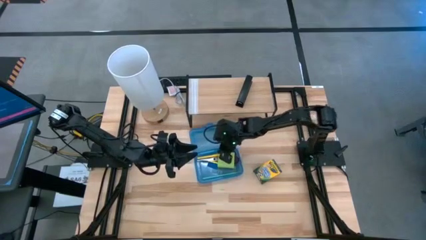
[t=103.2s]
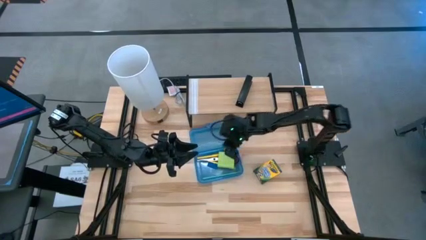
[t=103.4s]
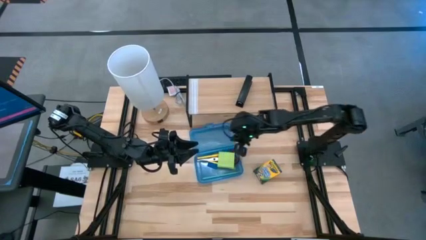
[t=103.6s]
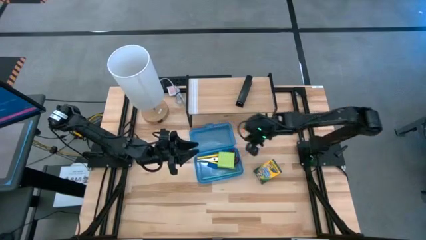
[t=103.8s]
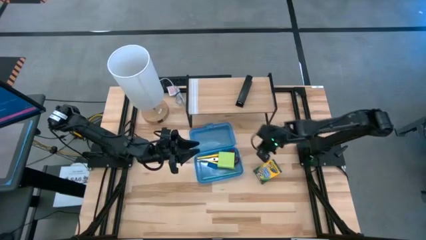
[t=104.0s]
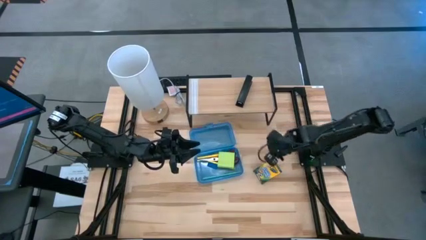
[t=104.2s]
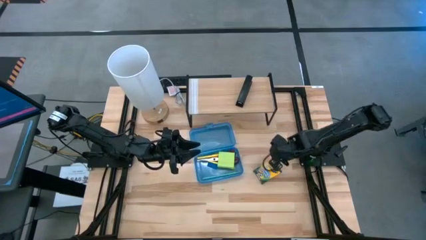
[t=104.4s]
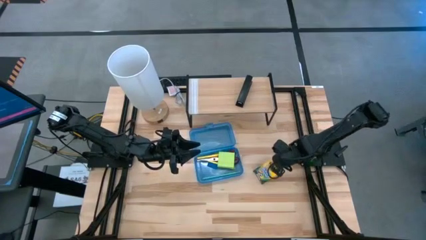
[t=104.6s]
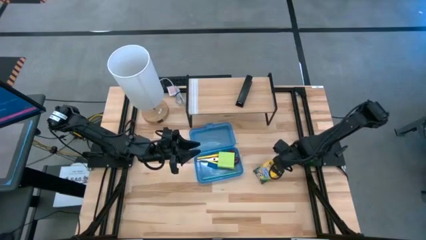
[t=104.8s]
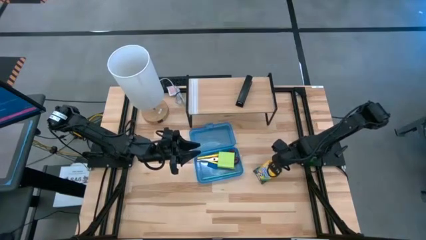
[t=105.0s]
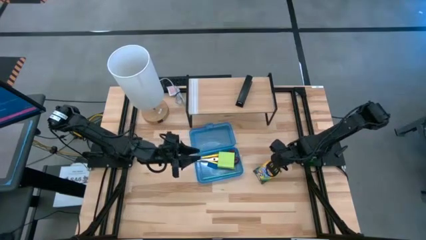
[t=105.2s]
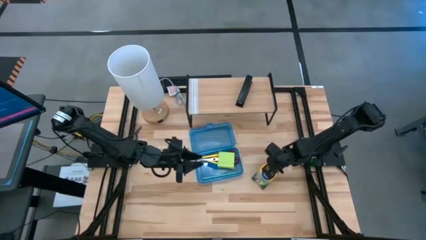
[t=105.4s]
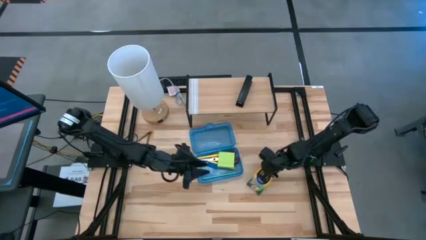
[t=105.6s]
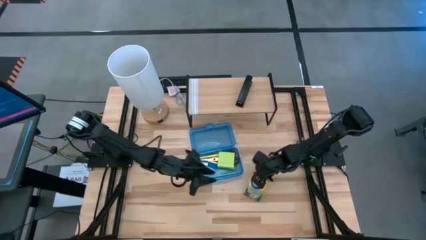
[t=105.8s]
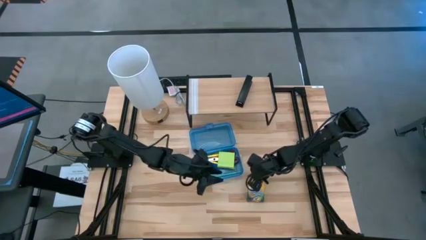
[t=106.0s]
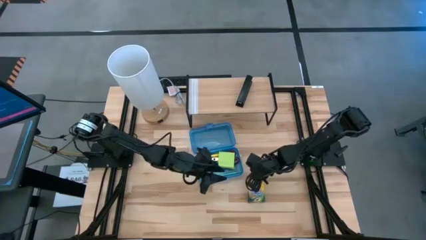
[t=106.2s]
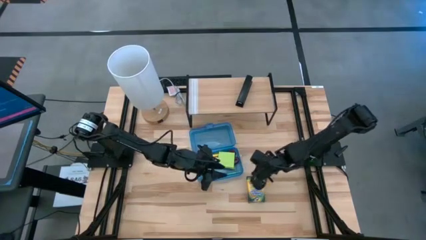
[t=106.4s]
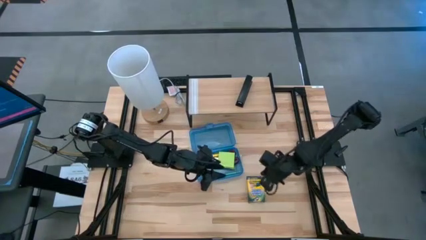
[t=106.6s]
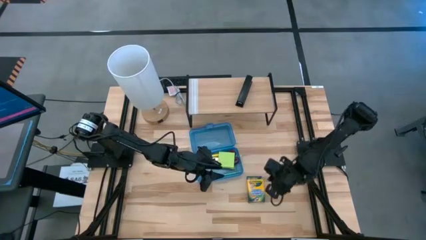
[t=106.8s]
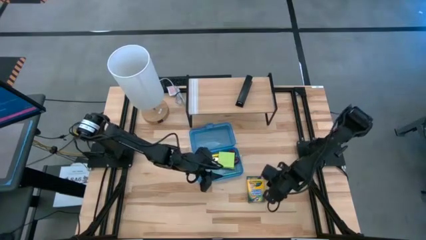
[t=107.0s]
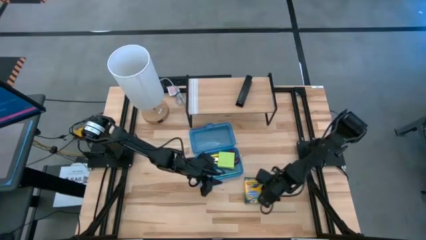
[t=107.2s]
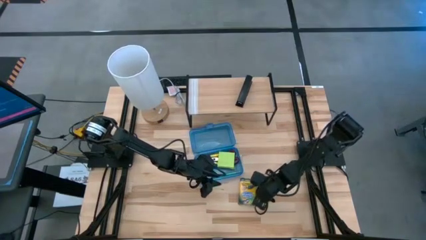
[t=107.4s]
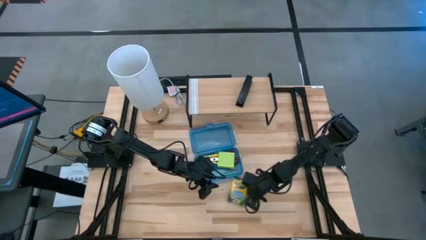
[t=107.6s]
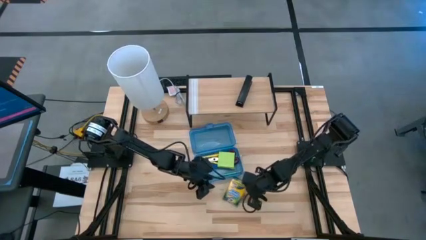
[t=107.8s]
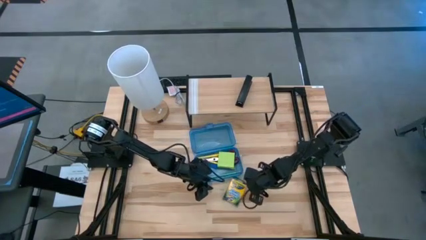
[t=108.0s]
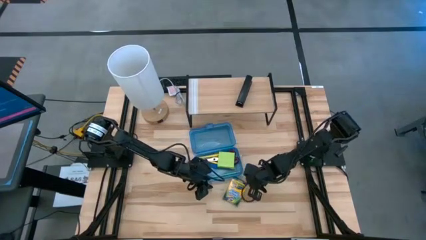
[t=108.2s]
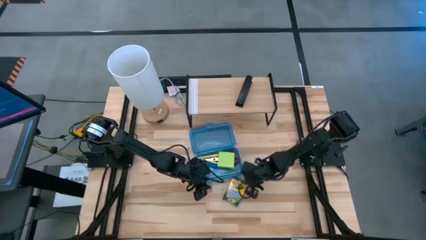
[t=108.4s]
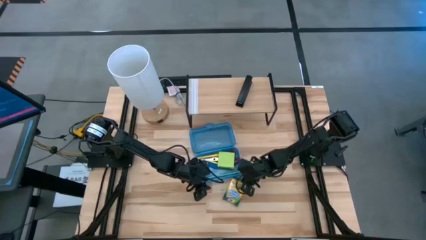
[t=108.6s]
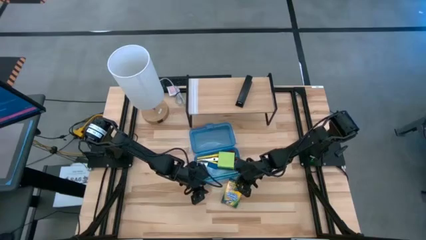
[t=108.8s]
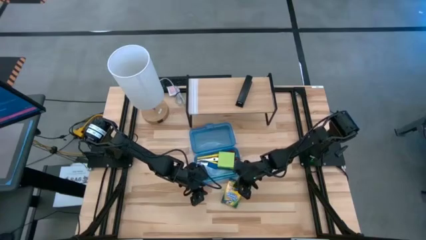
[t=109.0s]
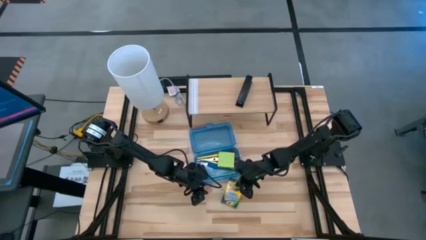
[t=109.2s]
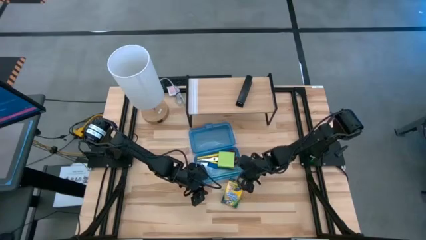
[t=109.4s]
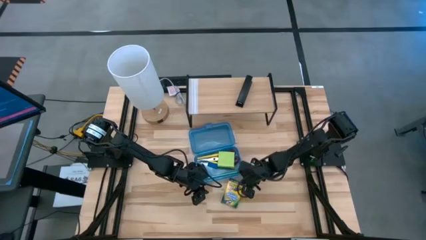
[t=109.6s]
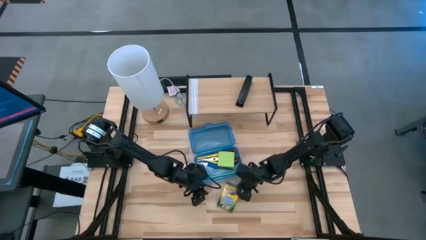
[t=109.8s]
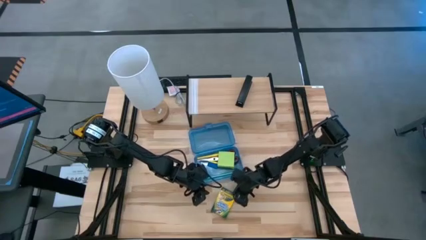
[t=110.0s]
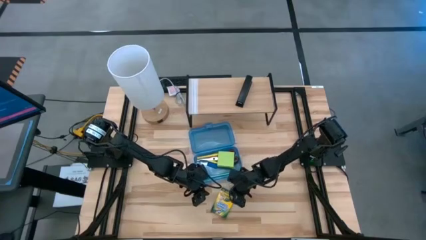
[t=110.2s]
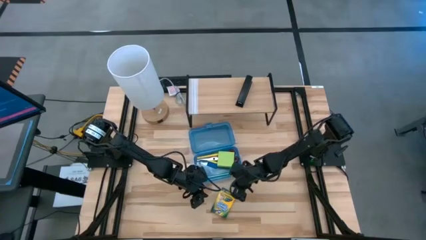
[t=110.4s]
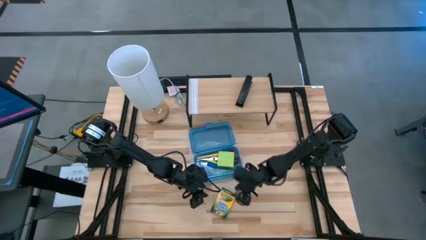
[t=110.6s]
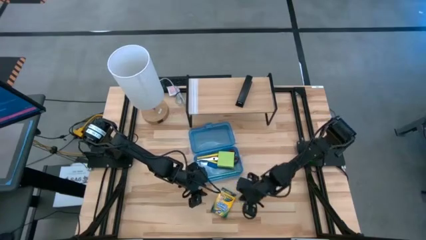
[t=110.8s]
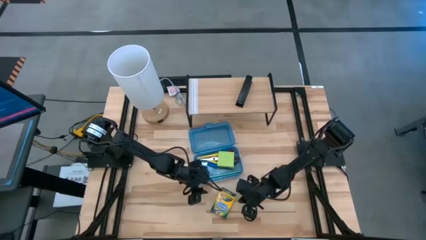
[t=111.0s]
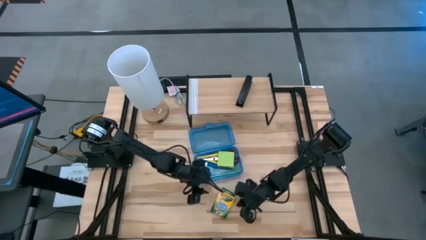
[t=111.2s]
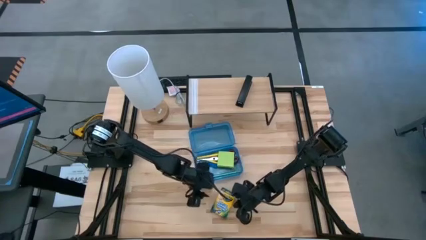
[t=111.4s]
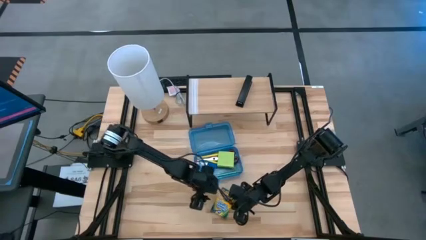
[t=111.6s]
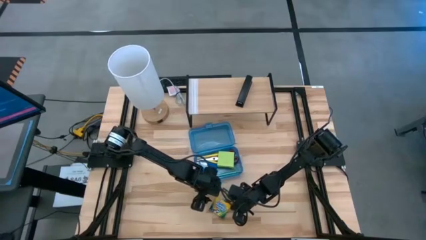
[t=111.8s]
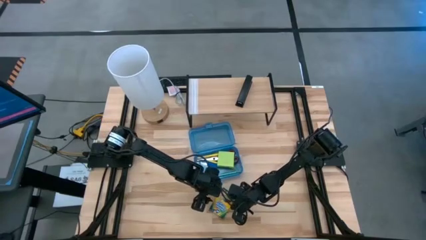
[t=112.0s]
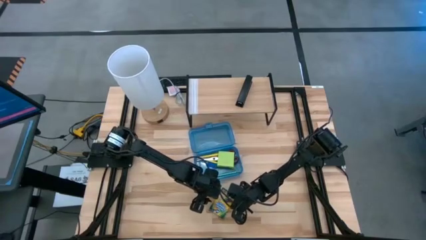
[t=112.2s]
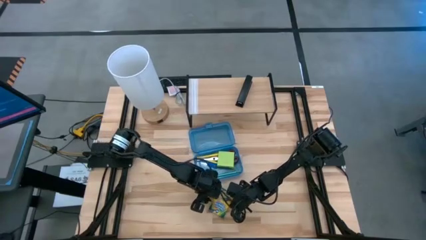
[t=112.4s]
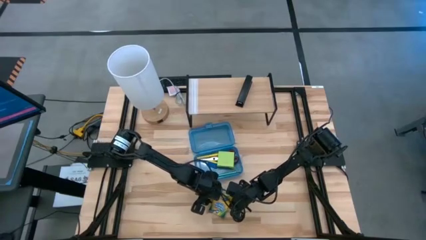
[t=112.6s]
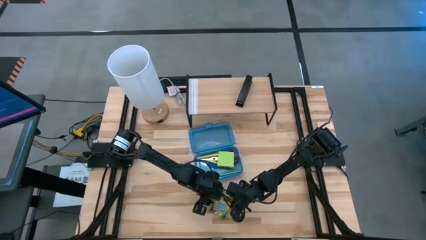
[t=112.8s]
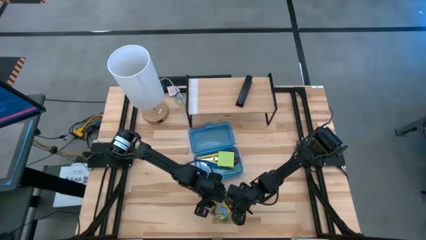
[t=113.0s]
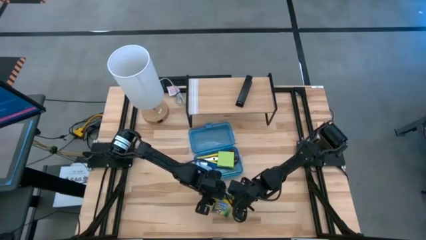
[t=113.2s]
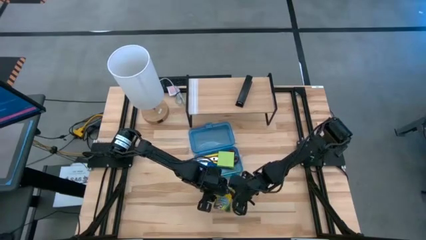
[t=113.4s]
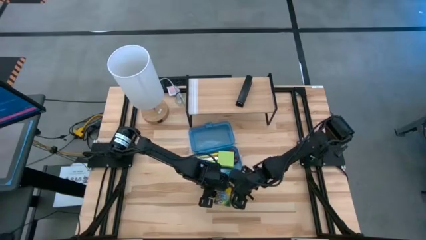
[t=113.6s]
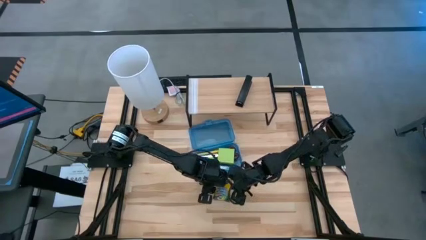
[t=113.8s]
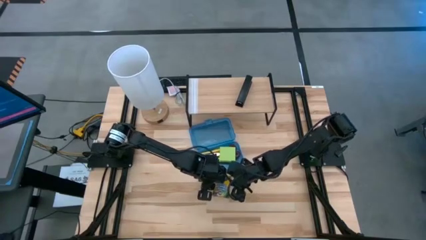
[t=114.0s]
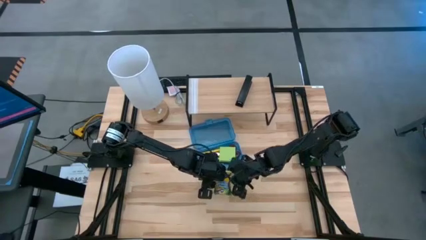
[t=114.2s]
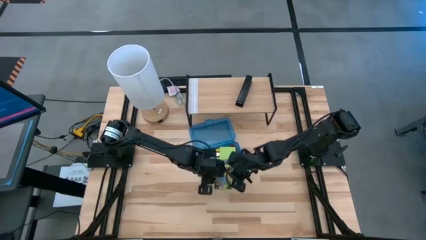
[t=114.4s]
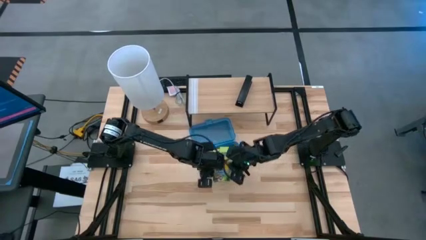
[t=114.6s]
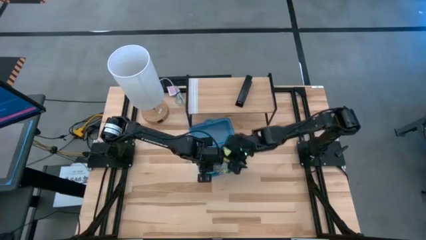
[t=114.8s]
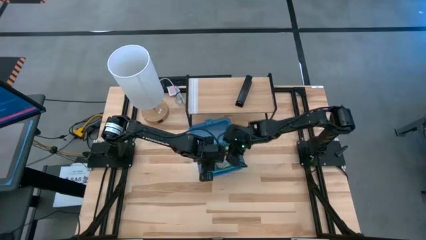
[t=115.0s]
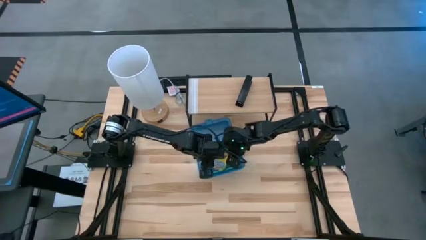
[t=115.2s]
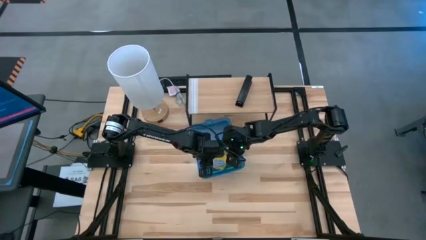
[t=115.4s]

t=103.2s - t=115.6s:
Task: Pack school essentials
Put the crayon box into the blue supply box

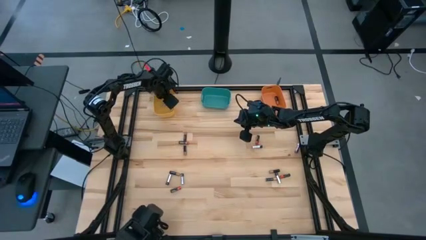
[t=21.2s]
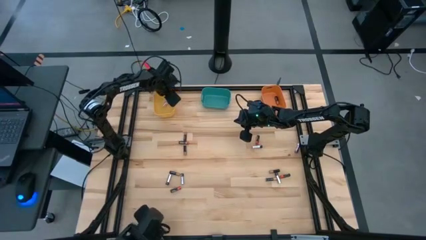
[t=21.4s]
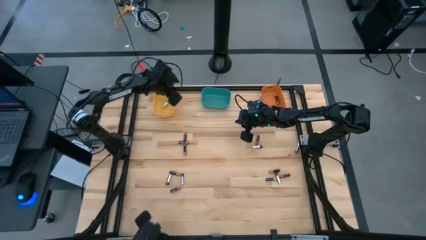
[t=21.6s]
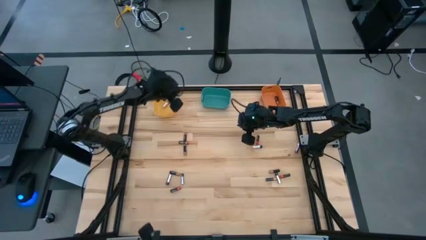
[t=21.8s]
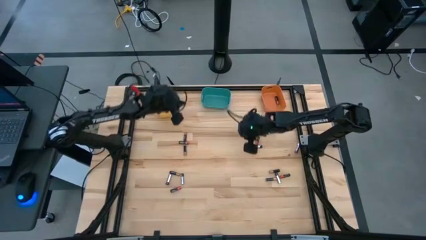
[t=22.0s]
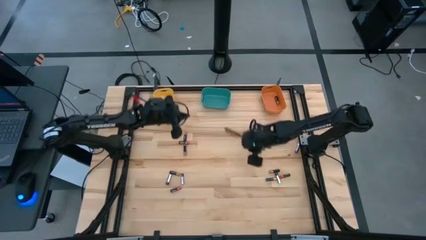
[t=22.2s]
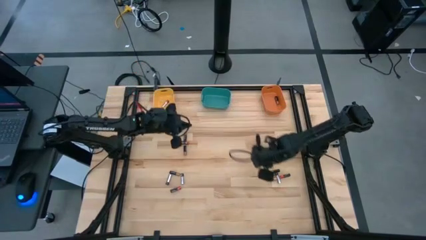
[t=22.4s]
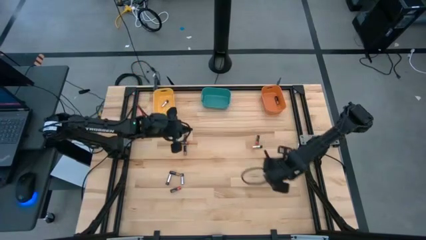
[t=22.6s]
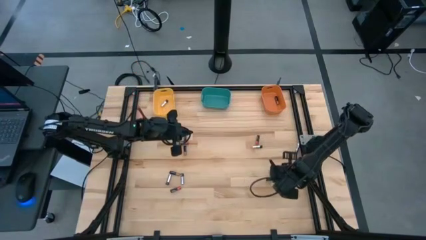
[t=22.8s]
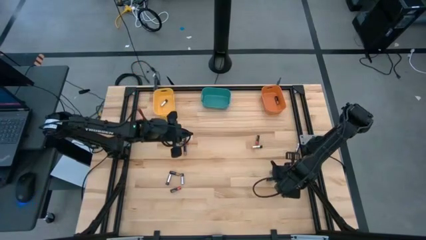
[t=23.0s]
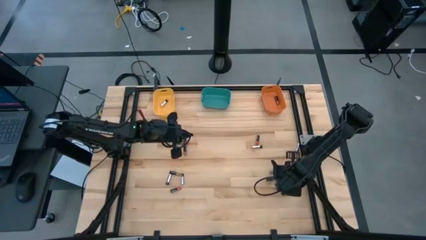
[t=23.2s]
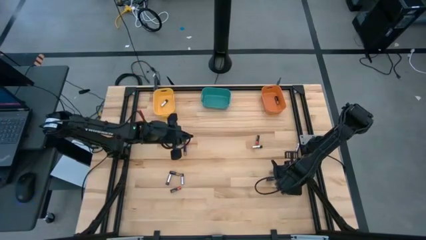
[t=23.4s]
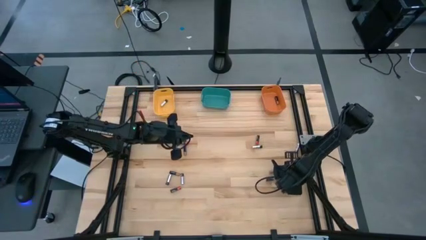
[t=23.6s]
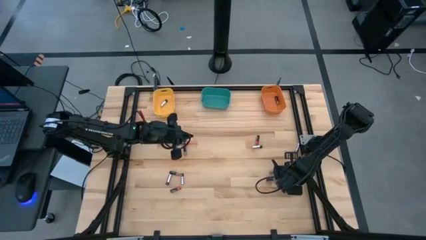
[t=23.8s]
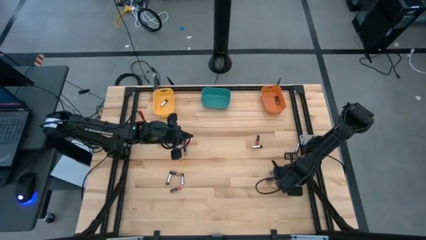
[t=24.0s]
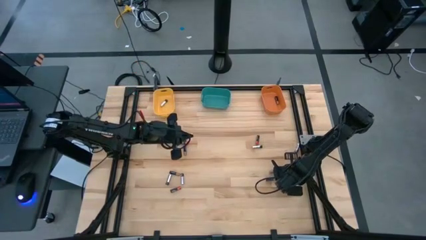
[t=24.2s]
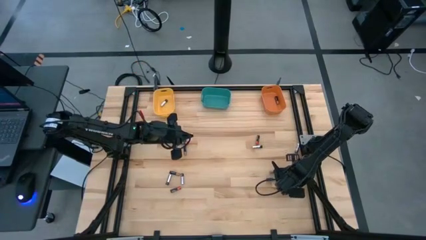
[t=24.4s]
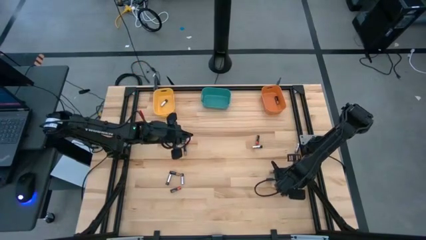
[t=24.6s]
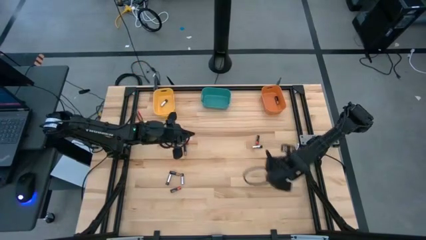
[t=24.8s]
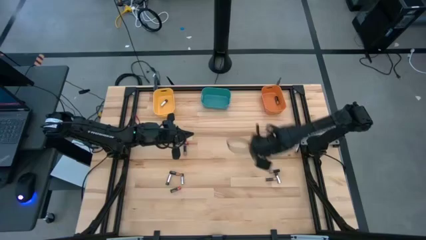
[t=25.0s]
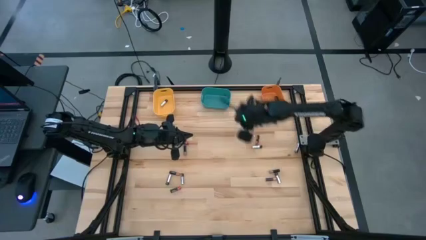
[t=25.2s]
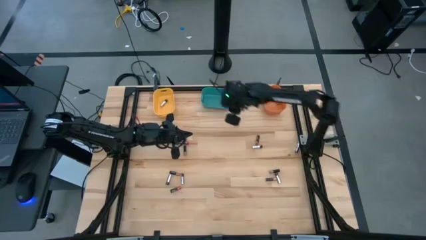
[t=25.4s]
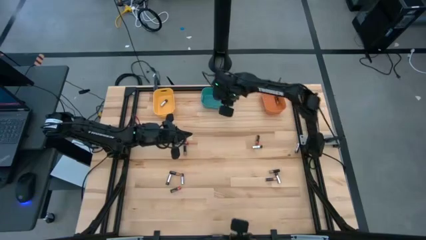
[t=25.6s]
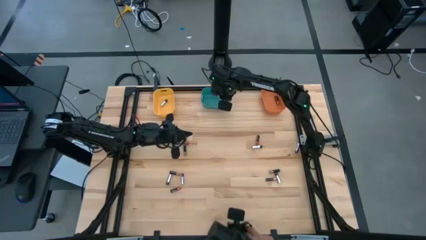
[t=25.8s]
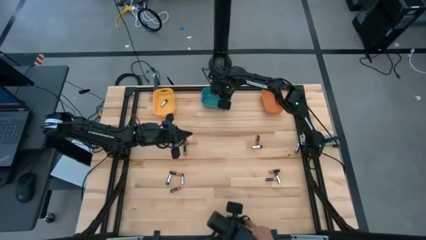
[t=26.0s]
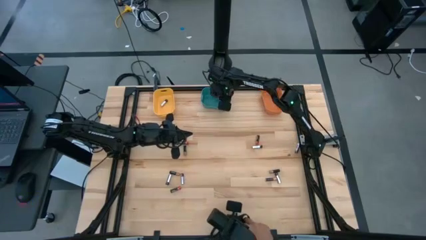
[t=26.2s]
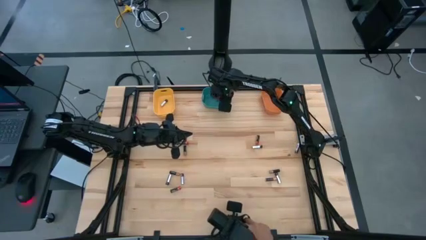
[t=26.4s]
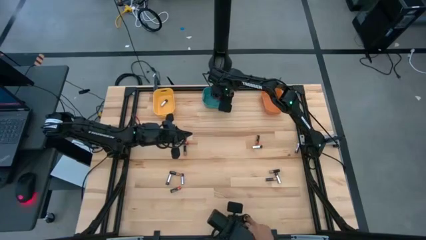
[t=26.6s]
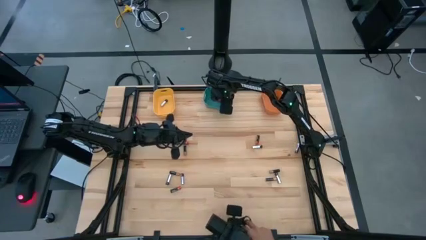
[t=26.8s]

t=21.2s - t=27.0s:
Task: Sort batteries
Put the red battery into the green bin
